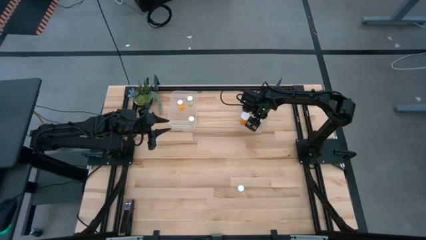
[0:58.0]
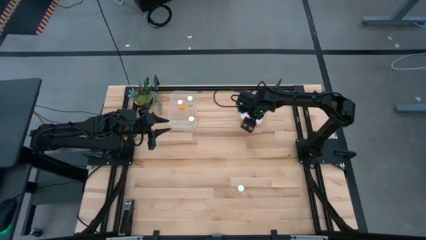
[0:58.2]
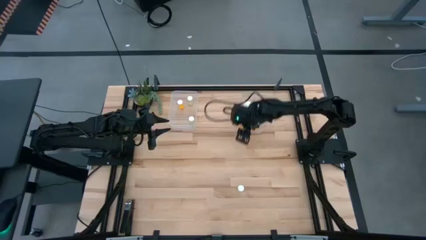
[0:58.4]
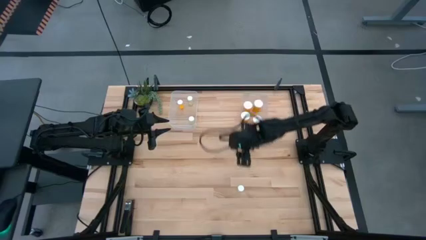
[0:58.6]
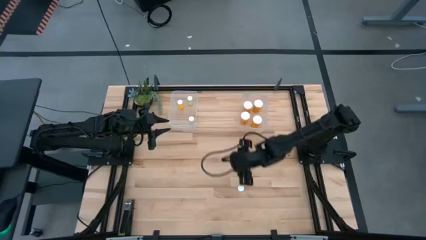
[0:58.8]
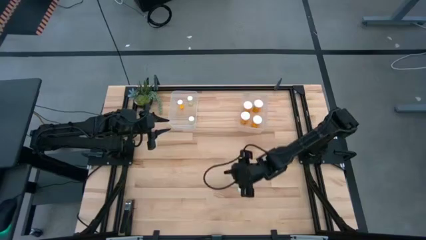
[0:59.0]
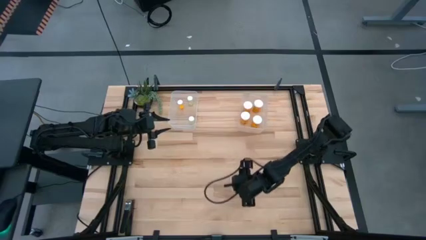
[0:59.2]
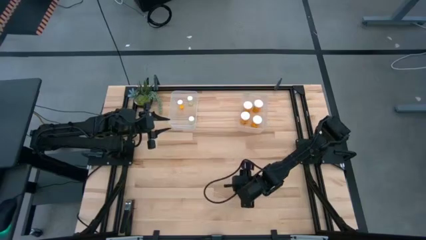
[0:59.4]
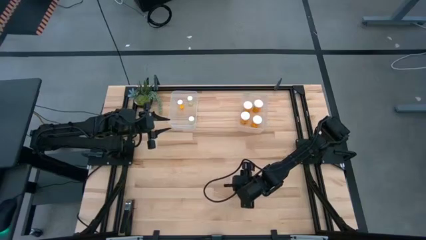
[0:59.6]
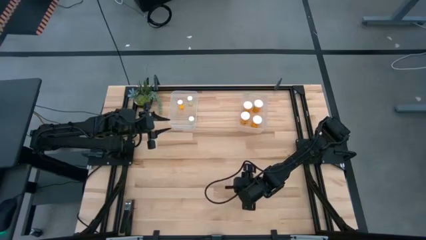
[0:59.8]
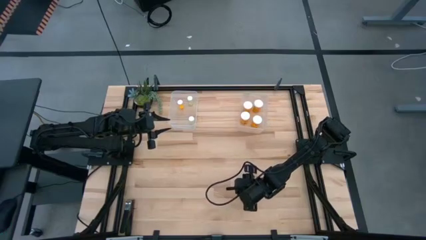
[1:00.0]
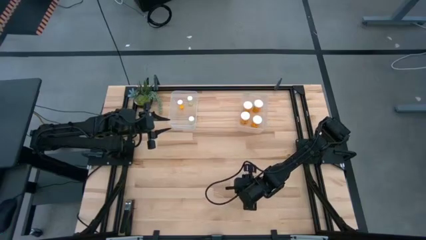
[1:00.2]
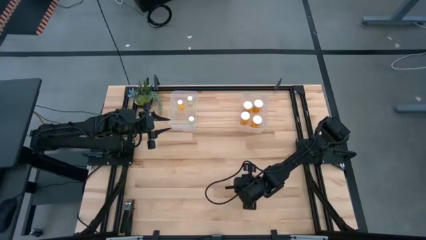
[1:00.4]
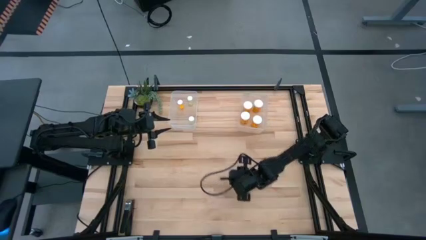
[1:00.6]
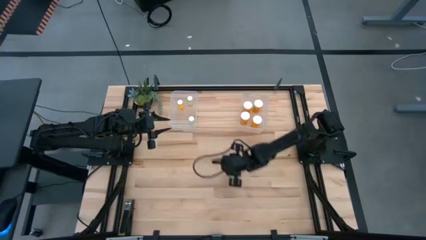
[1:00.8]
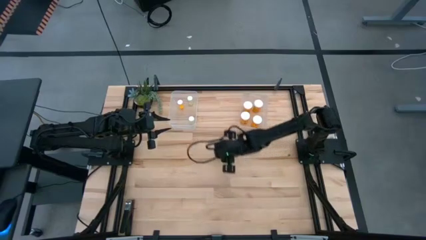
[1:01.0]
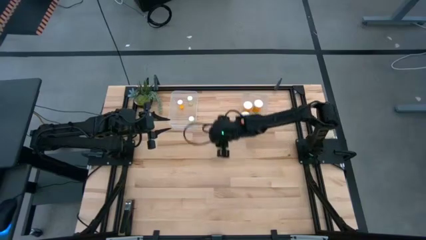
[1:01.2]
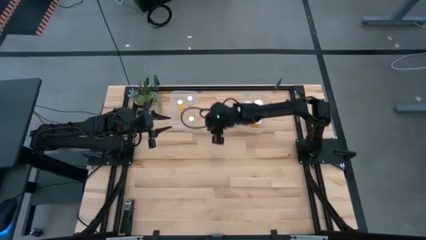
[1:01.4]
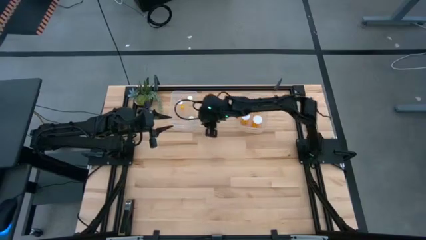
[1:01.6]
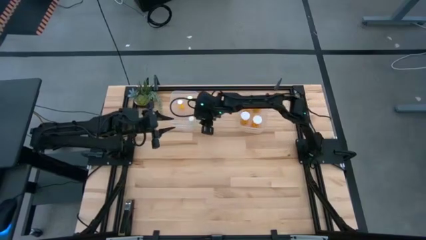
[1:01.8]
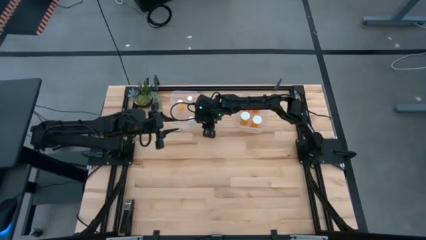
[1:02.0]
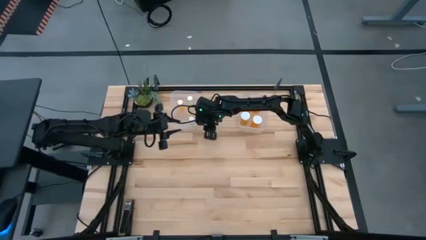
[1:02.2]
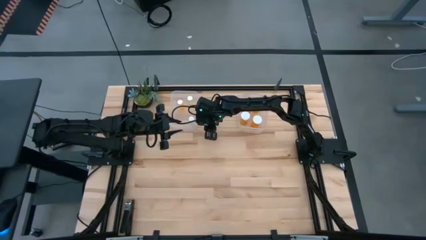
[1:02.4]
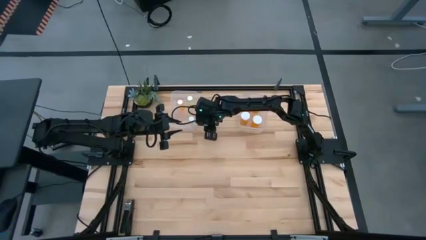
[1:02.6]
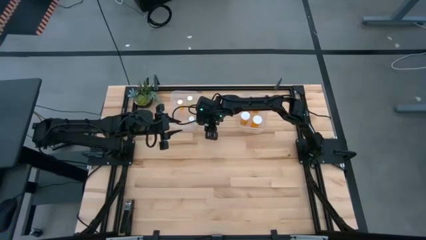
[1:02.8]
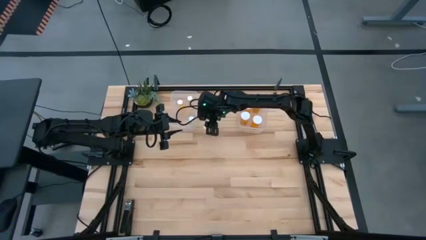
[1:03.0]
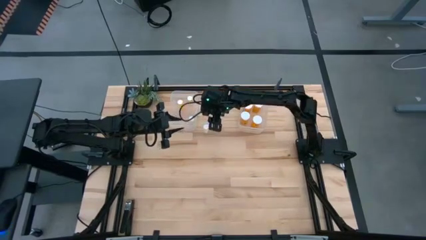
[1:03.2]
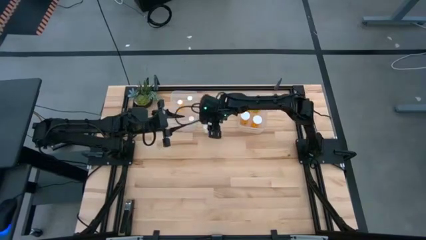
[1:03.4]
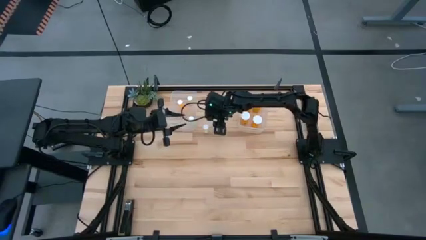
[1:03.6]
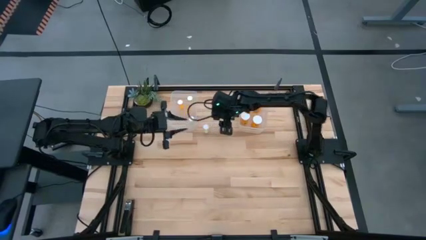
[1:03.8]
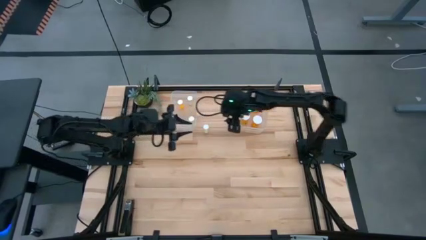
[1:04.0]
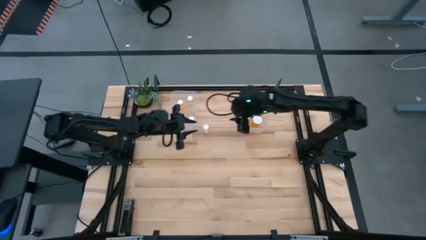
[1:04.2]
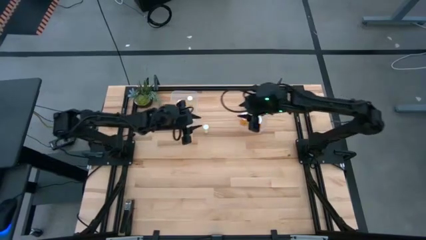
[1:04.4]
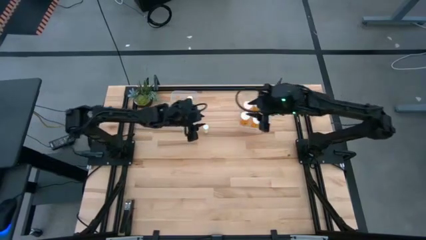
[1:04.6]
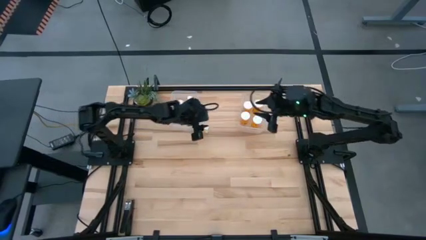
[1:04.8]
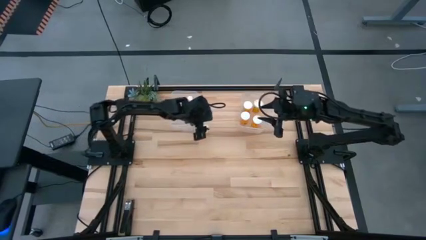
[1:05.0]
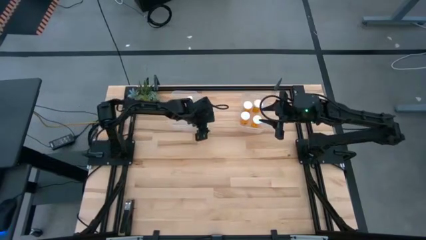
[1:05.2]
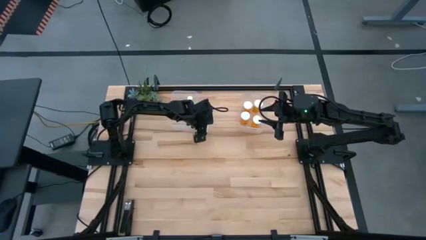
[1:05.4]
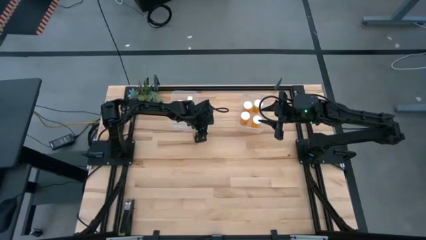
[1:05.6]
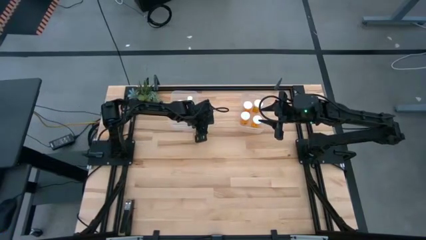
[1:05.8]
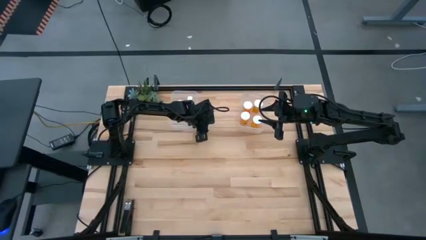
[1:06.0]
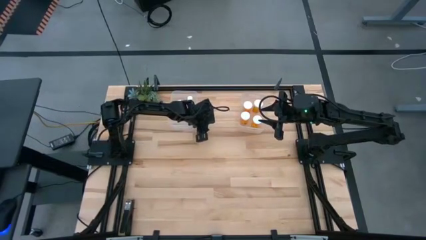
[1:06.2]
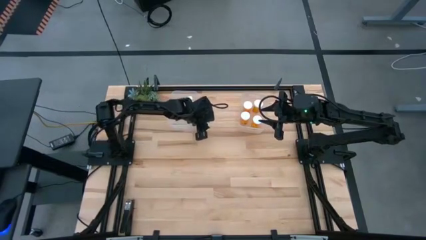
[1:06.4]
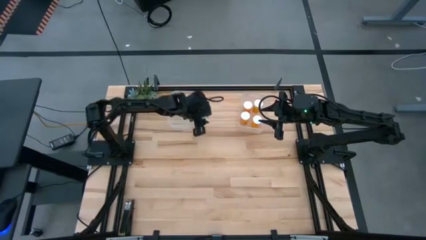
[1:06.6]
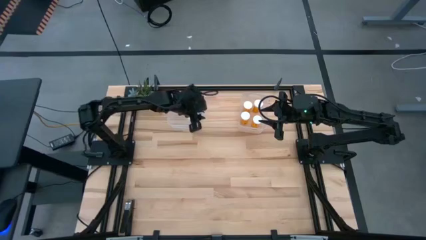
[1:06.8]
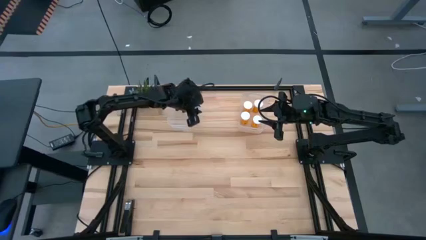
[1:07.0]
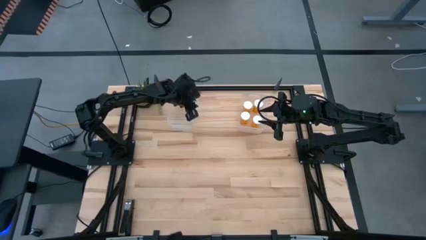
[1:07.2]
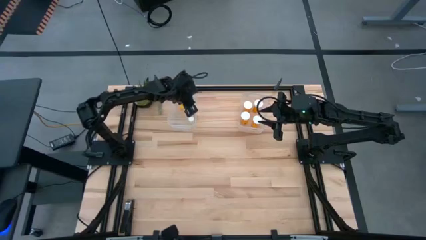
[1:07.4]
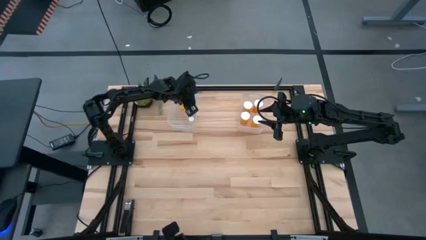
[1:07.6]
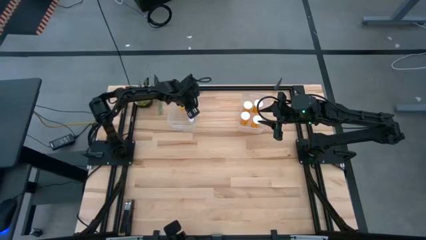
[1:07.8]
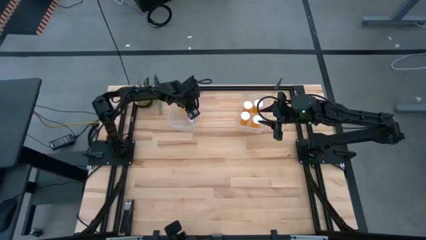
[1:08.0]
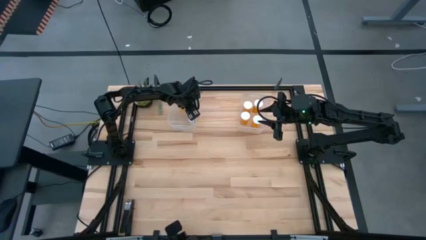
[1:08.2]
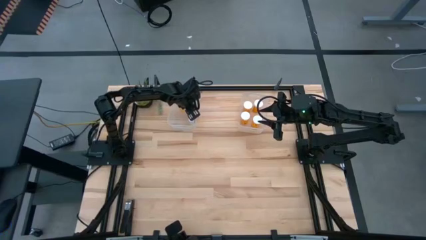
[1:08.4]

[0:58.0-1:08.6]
Task: Pick and place medicine bottles into bin by pill shape (circle, oval)
Put the yellow pill bottle into the left transparent bin

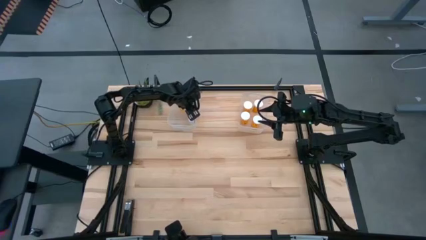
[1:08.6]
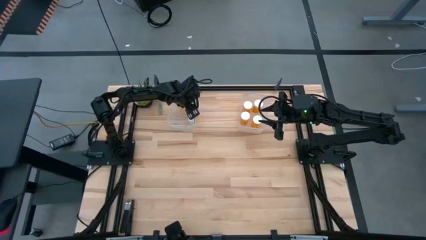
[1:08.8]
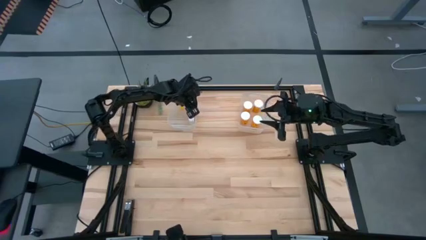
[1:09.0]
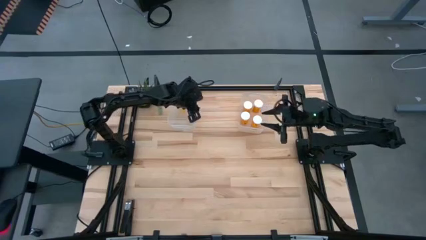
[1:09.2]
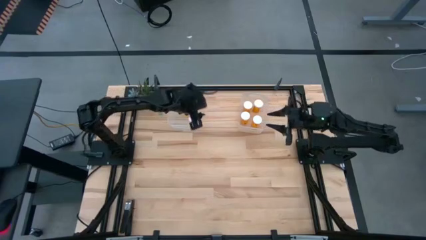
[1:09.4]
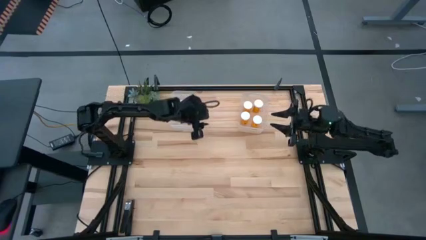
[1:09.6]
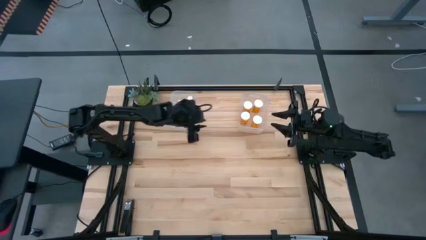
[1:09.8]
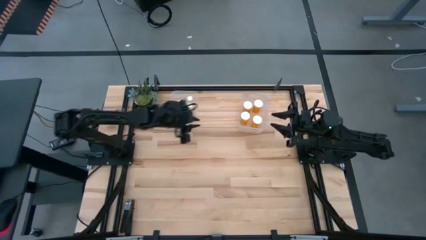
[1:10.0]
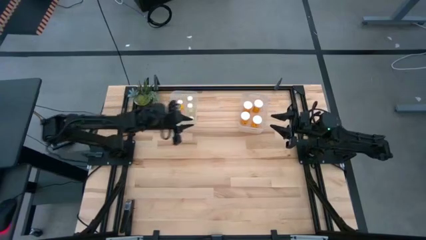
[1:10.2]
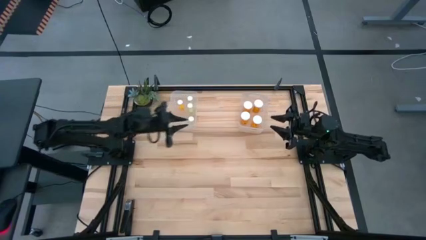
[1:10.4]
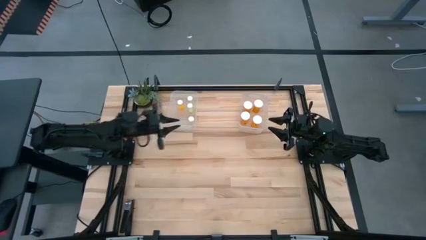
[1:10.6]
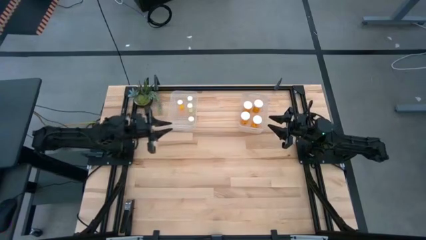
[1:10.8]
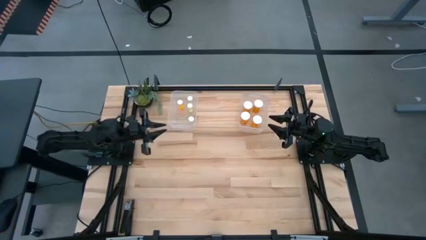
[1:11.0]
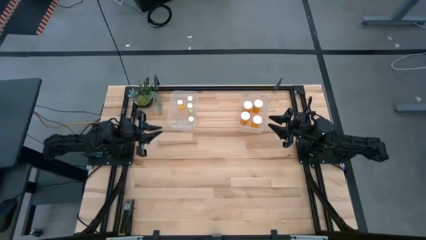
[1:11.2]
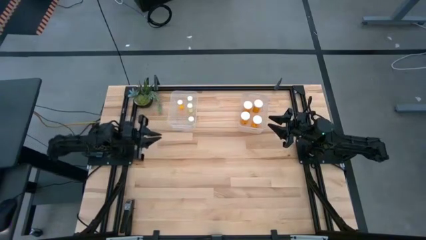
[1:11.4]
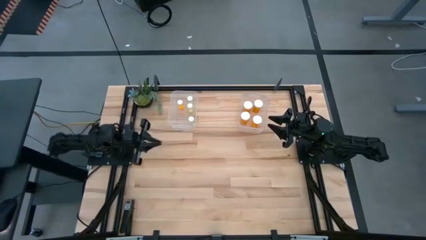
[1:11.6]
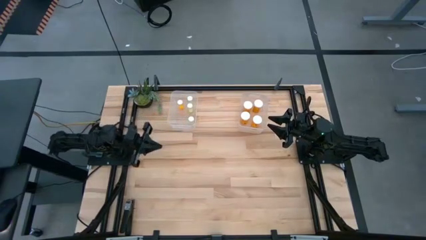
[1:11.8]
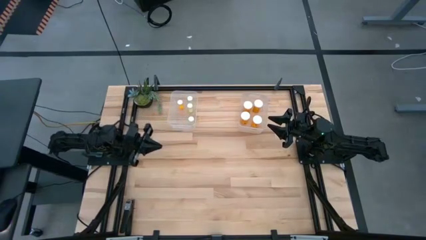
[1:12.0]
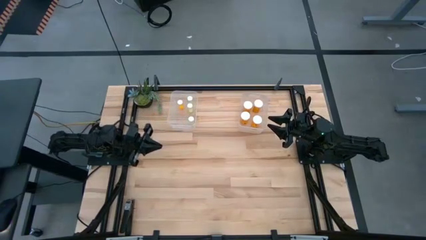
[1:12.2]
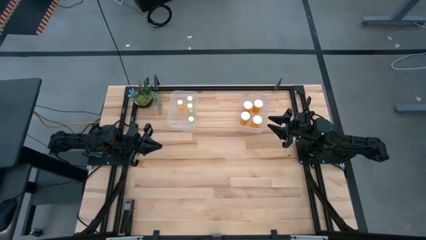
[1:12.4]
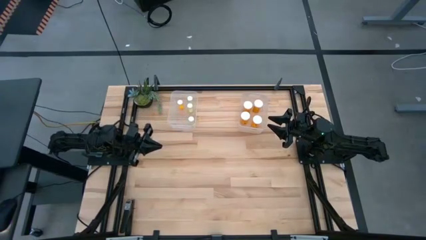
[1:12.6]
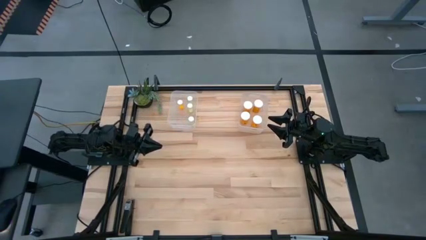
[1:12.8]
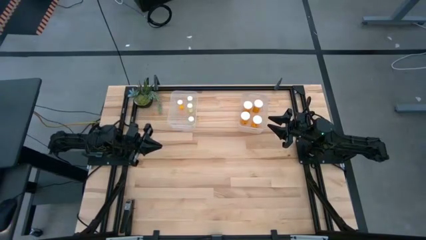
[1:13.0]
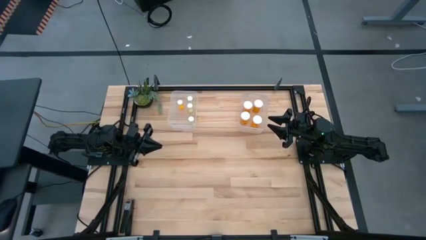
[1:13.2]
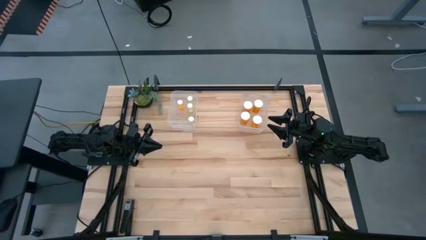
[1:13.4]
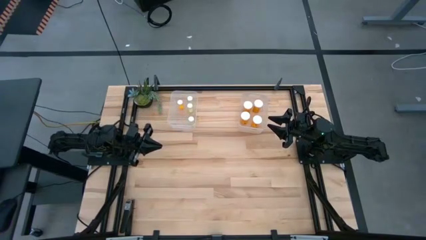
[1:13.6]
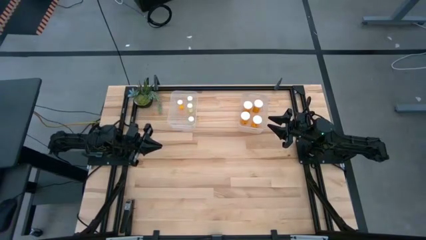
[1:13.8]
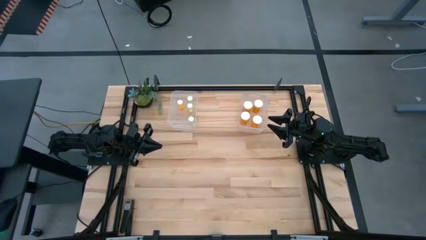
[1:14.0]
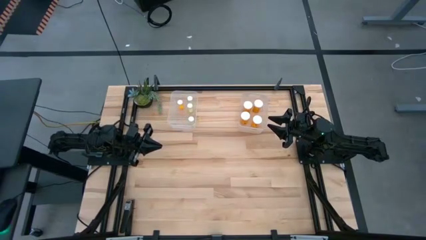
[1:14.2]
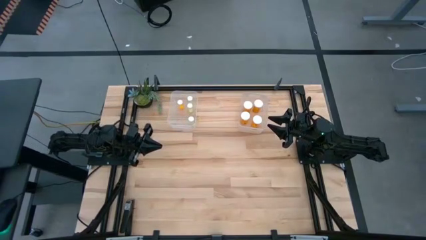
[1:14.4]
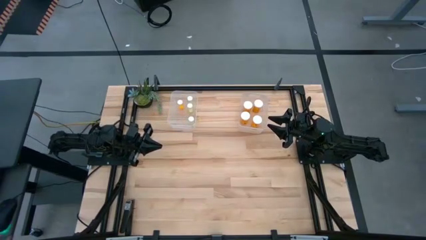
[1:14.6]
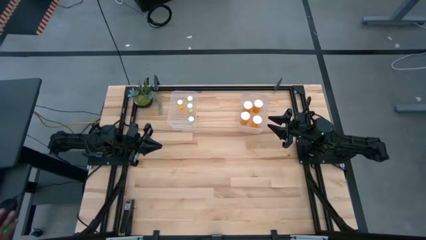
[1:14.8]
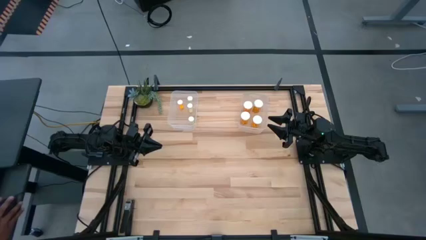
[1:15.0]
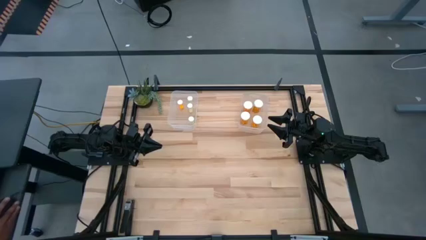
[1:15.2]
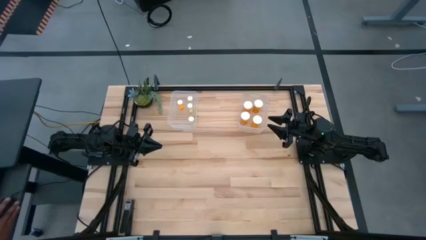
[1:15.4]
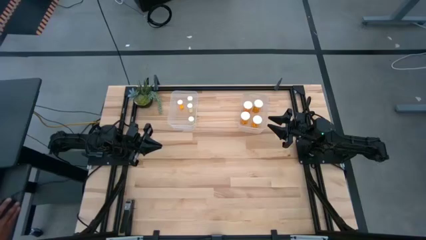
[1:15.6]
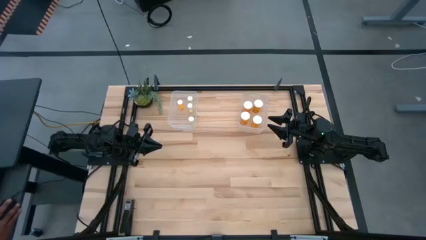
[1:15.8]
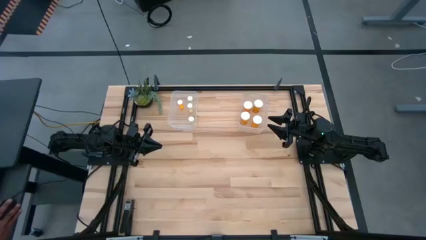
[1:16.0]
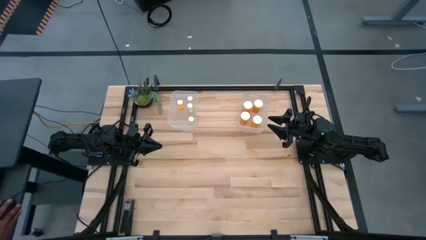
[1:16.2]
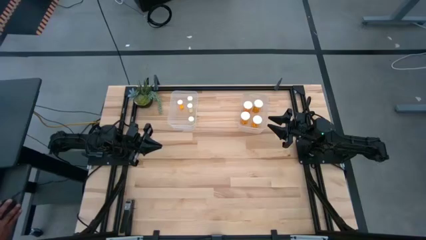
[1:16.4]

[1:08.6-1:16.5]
Return to Home Position
